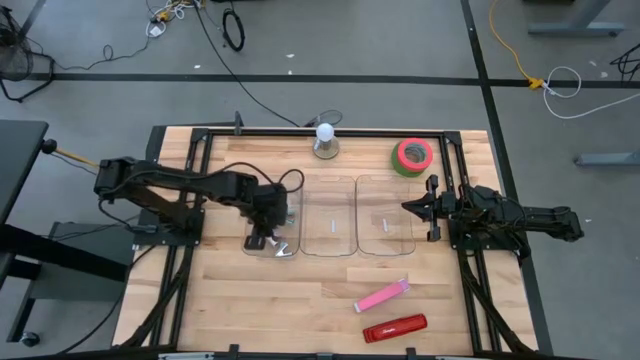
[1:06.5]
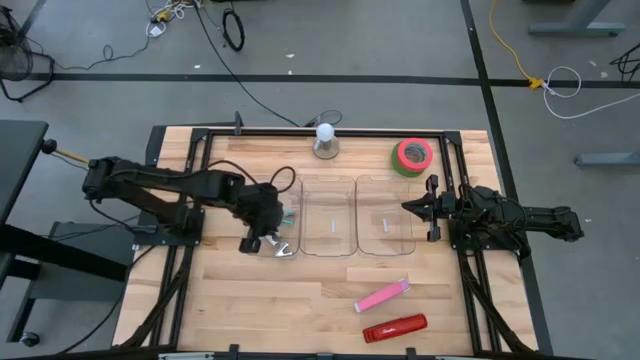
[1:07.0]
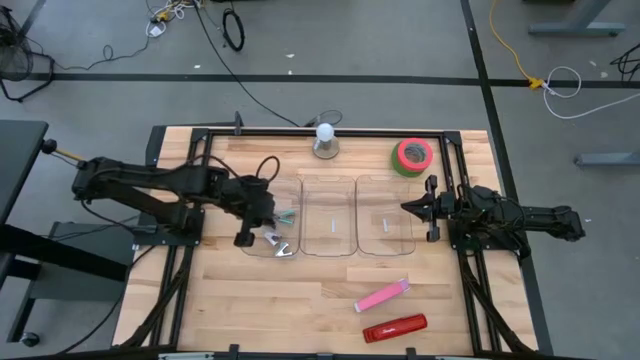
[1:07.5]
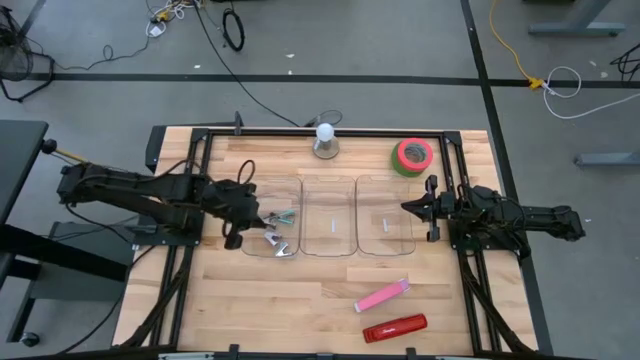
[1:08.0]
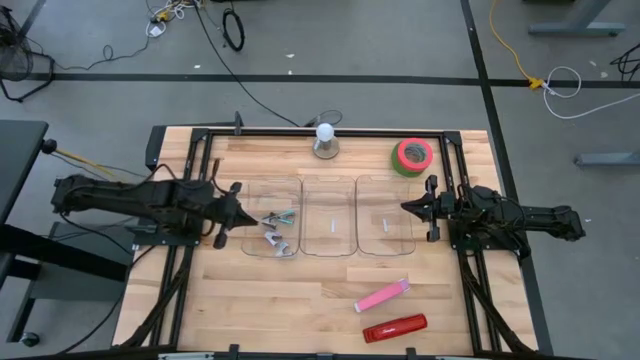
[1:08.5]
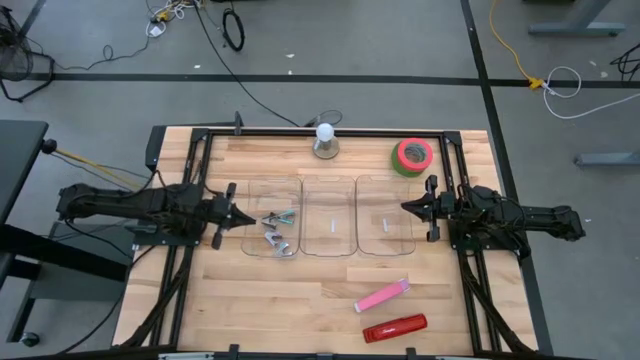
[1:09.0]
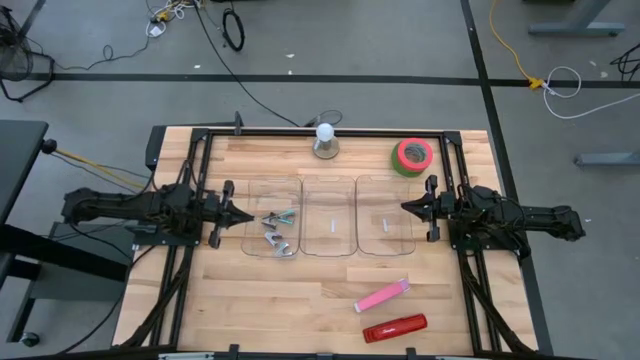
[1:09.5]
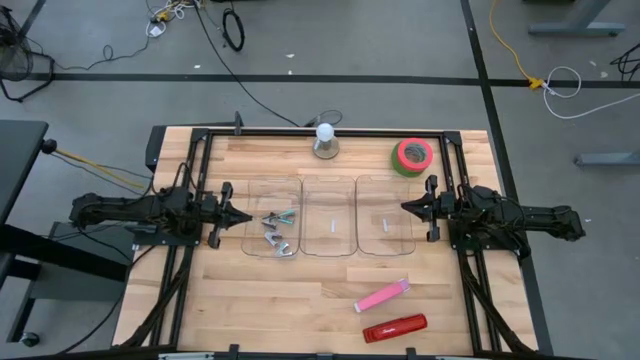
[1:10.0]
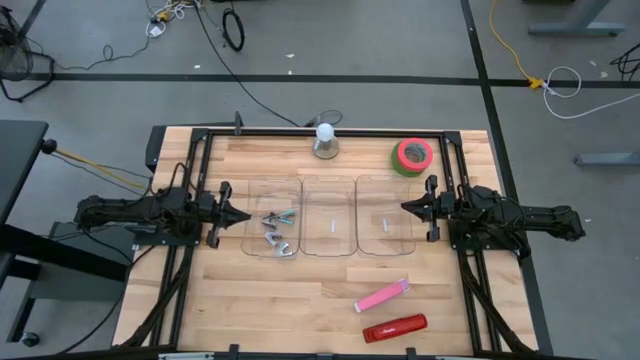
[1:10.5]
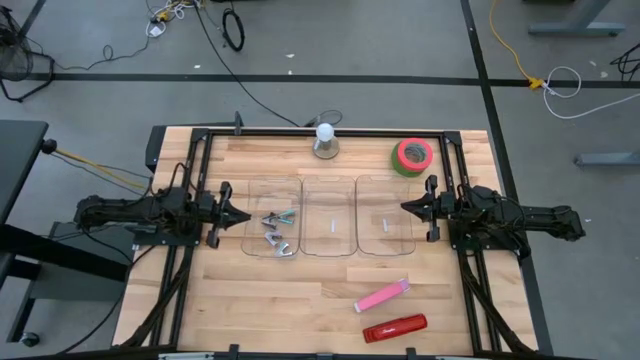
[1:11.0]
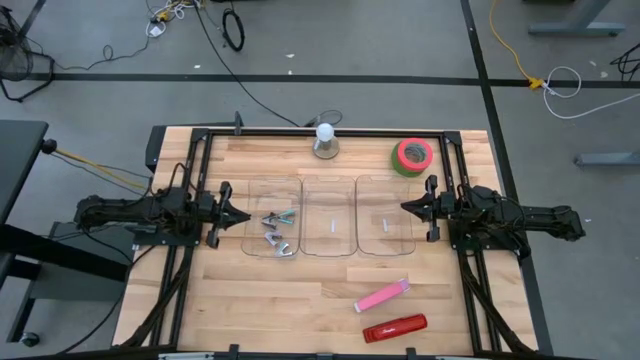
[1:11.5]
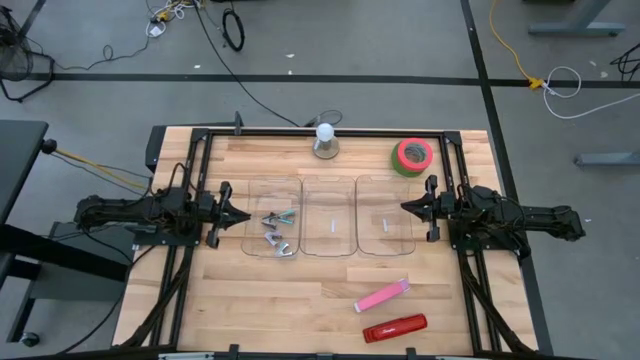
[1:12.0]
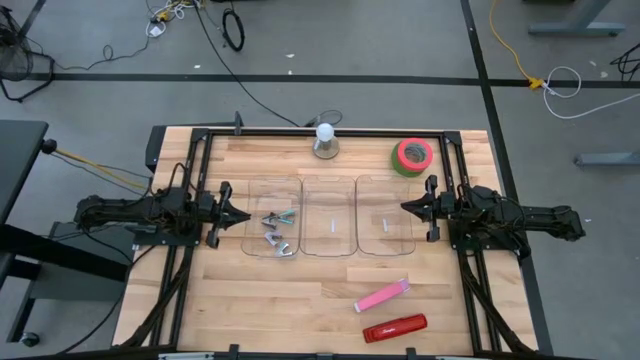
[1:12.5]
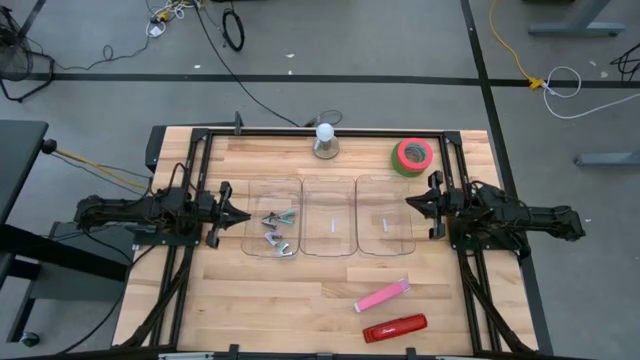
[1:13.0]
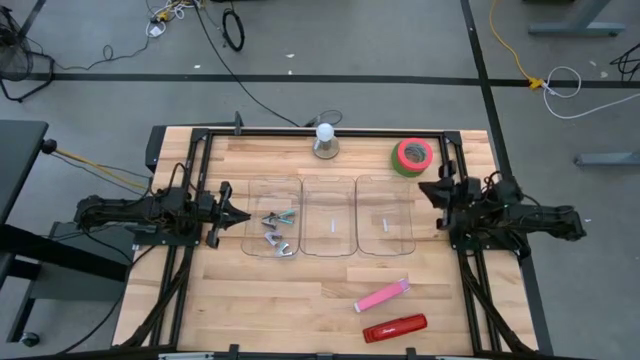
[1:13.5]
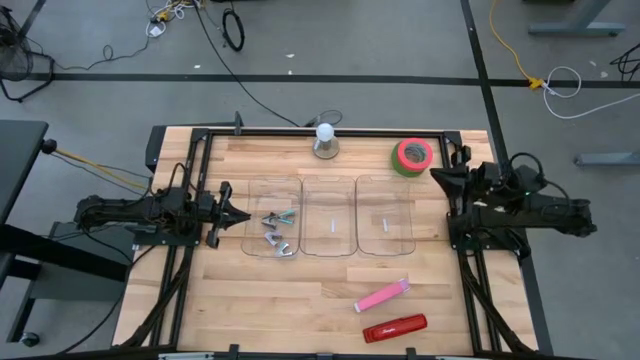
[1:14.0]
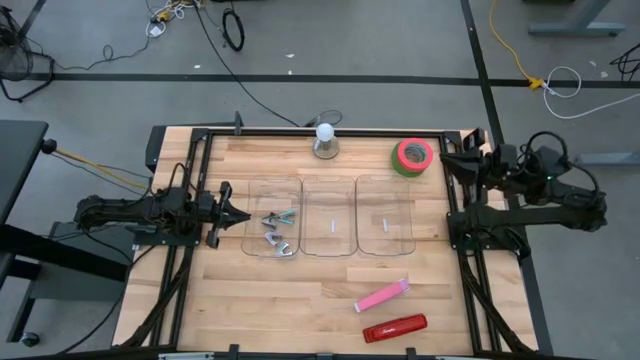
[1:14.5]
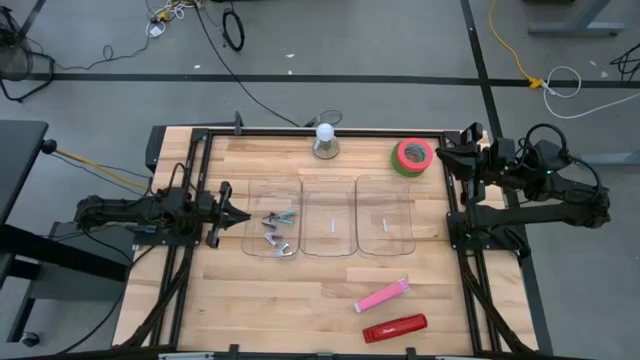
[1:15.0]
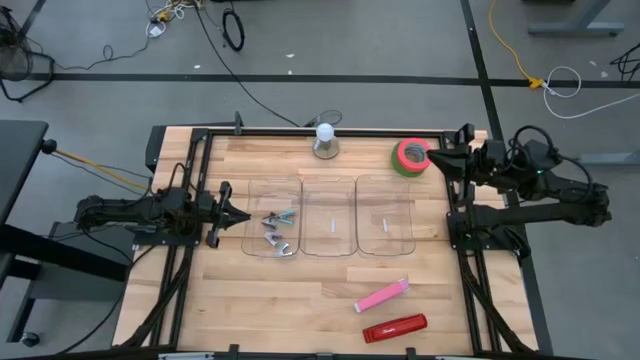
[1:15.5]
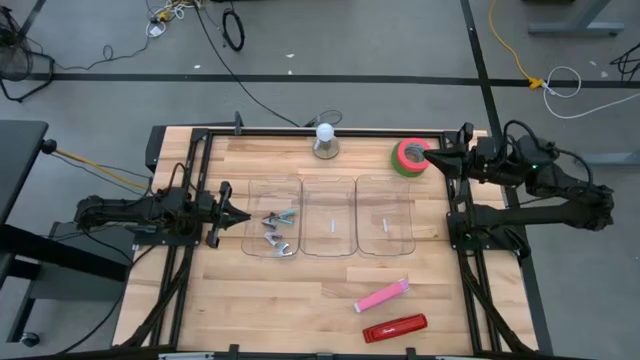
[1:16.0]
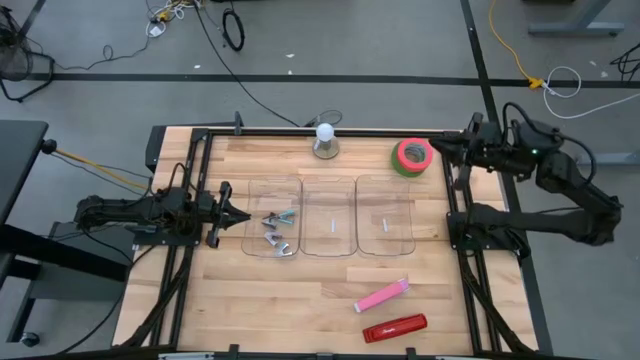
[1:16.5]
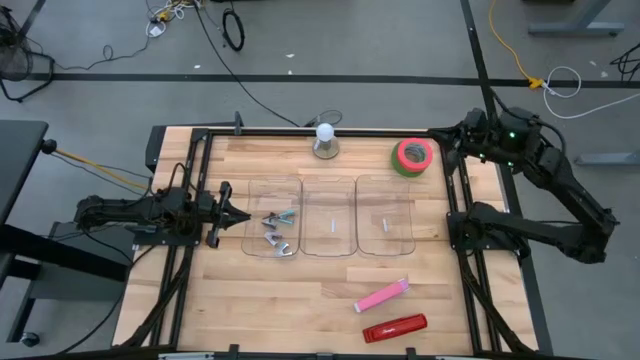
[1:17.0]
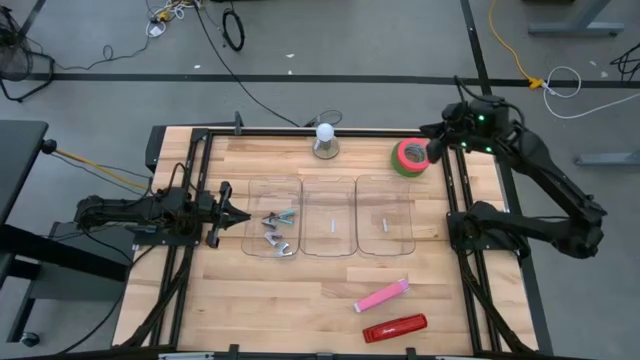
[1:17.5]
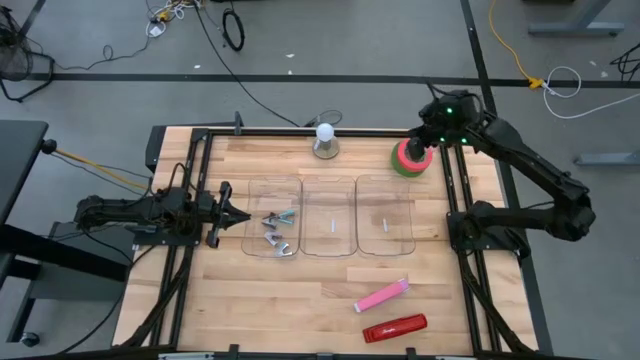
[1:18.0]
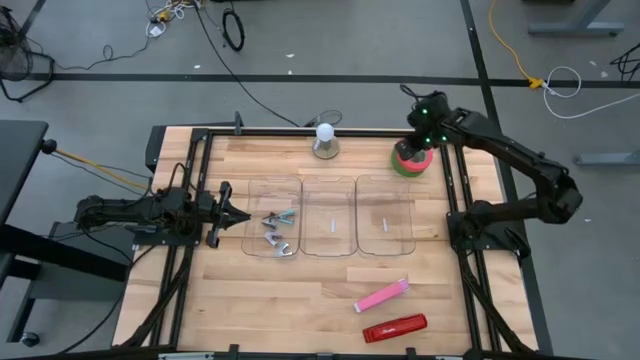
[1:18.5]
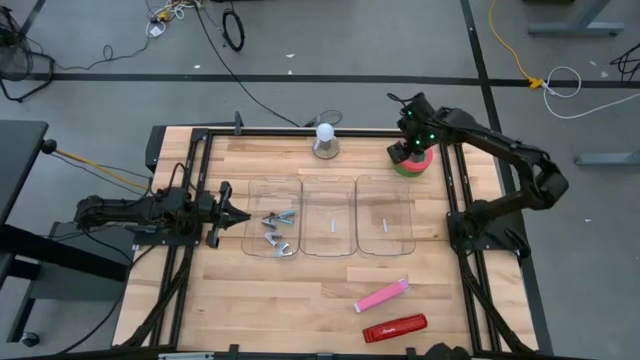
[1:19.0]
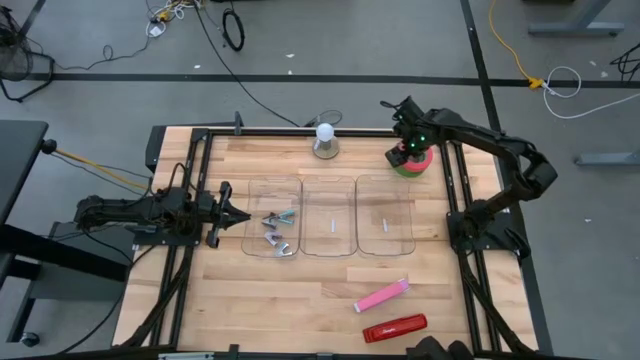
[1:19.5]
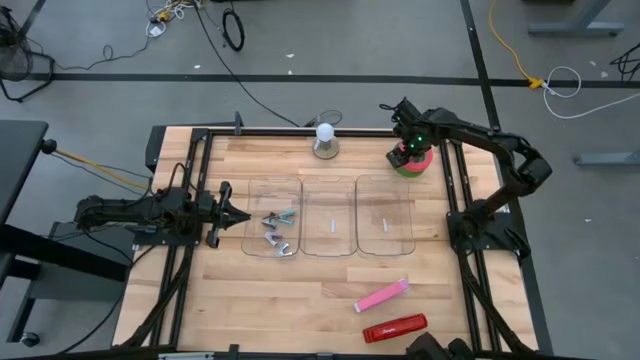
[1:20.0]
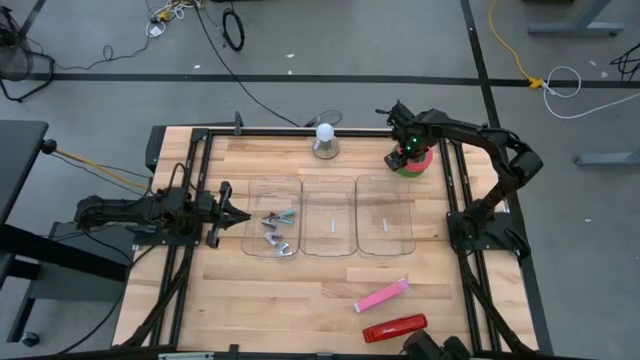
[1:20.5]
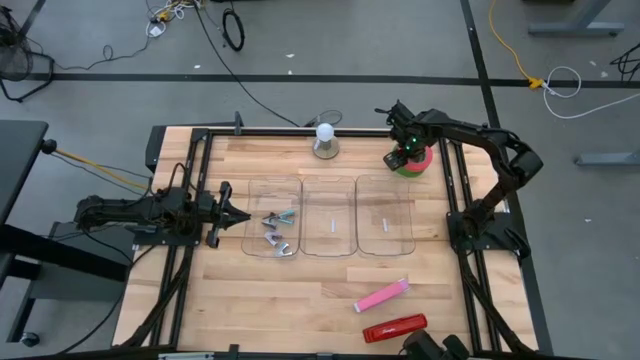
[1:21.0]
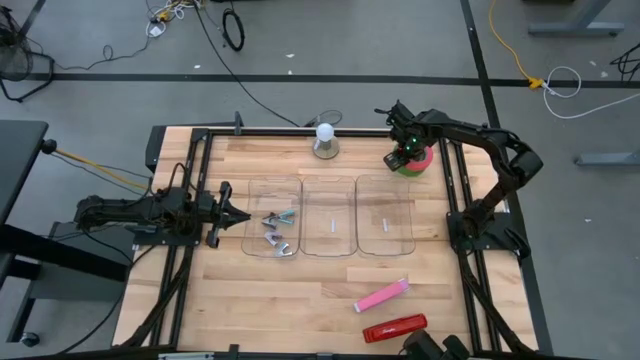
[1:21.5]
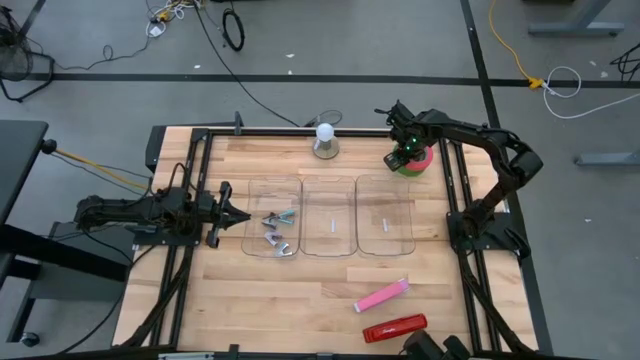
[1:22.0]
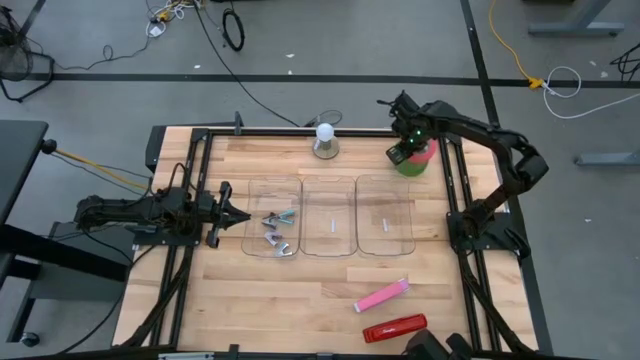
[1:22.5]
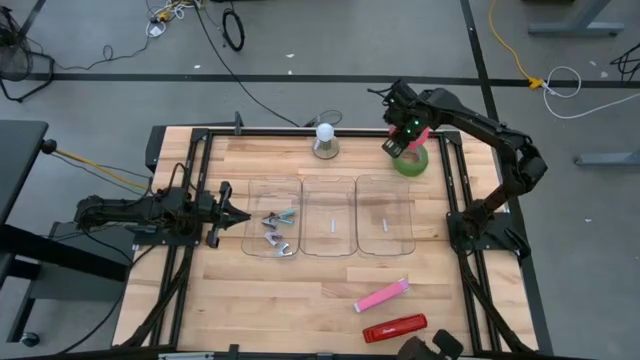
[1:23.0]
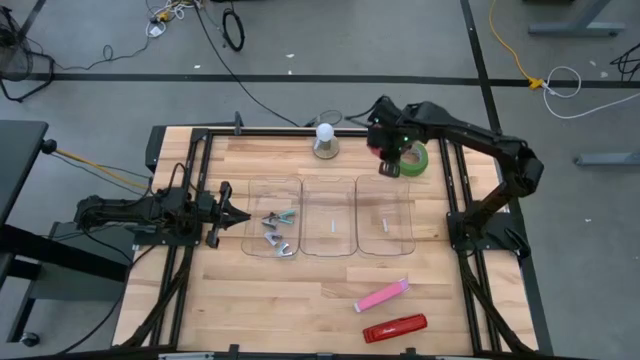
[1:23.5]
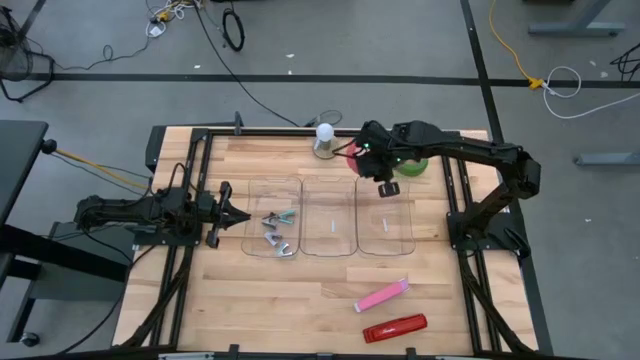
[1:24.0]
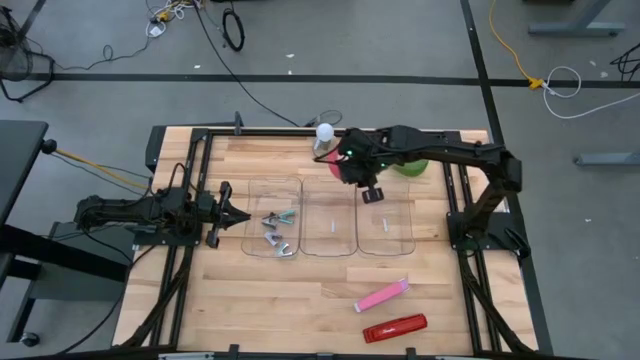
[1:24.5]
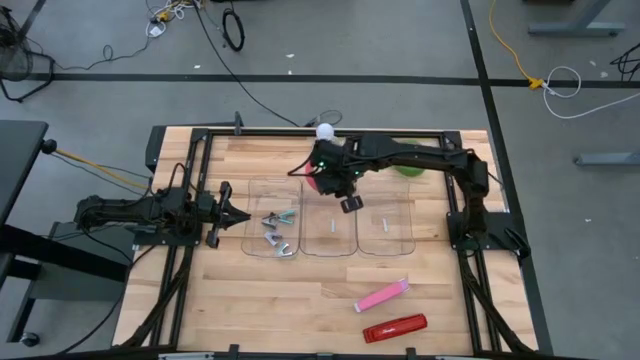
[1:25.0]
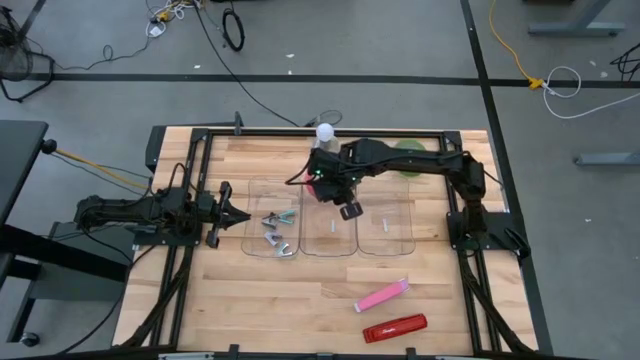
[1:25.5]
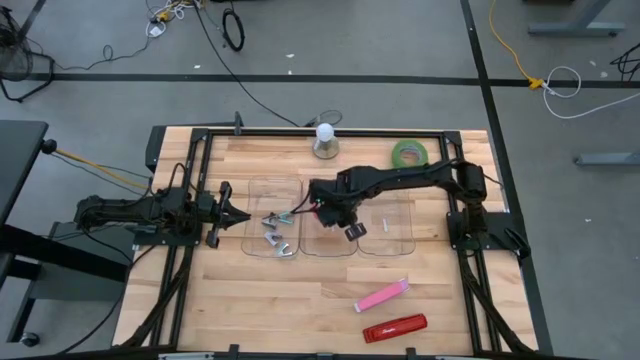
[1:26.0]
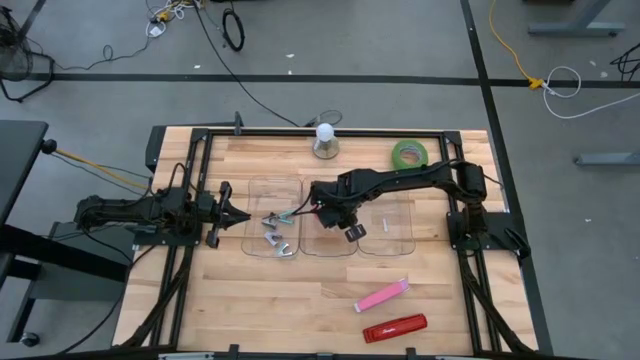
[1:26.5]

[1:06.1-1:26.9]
Task: Pick and place Stapler, Stapler remover, tape
Put the pink tape into the middle transparent bin

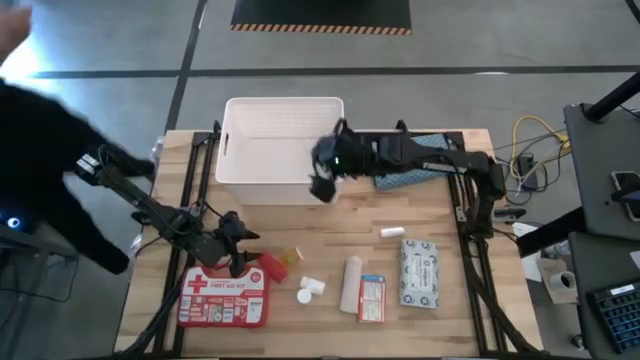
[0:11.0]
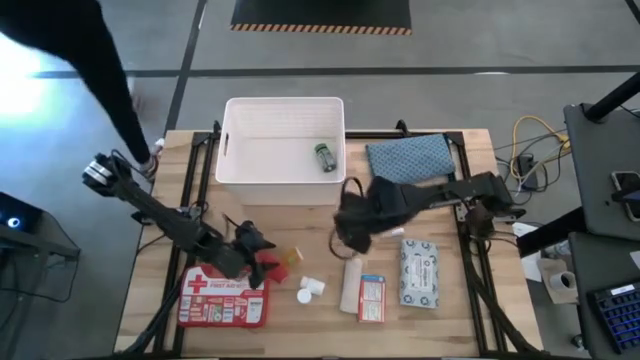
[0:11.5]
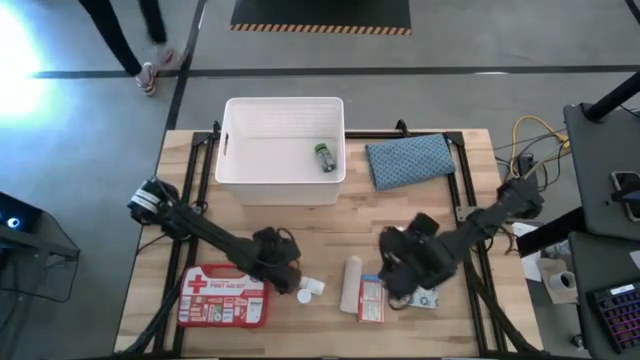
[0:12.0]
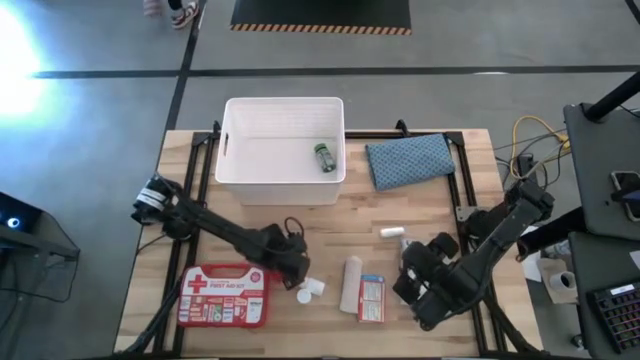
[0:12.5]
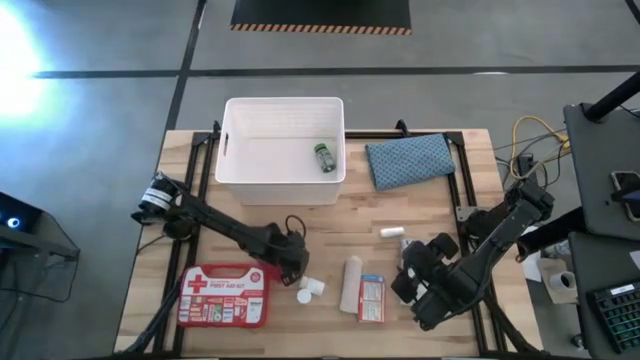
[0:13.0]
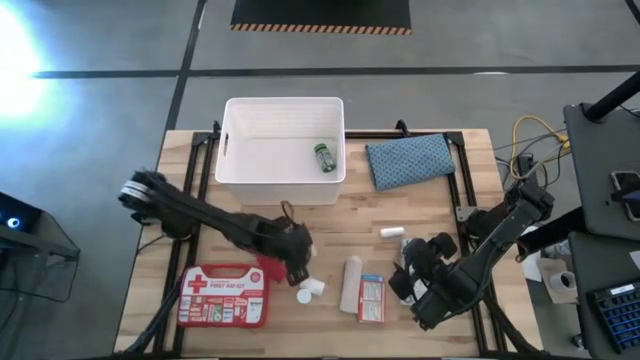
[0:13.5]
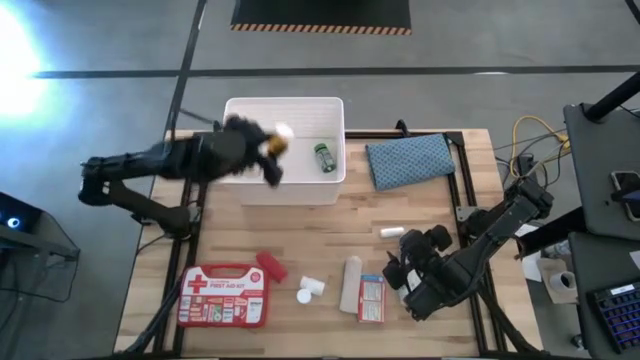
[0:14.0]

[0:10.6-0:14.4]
Task: Pick & place medical supplies in basket/bin
Put the orange pill bottle into the white bin
